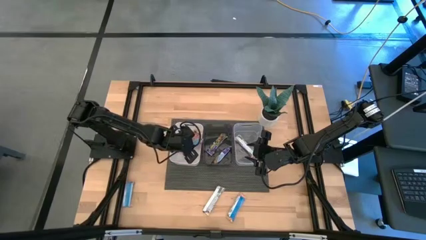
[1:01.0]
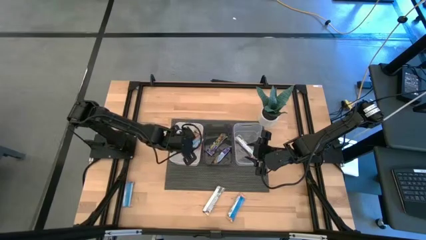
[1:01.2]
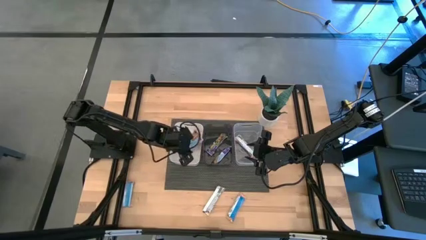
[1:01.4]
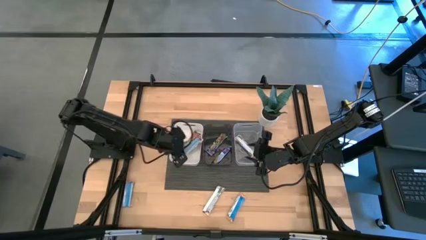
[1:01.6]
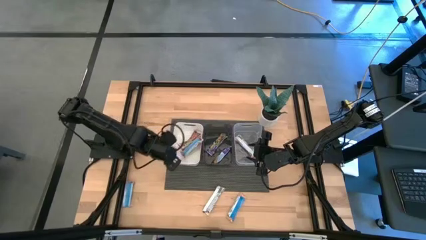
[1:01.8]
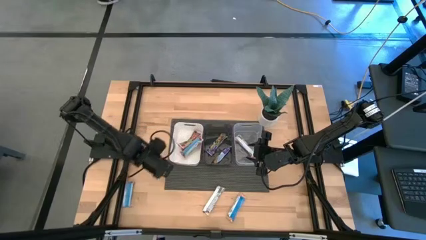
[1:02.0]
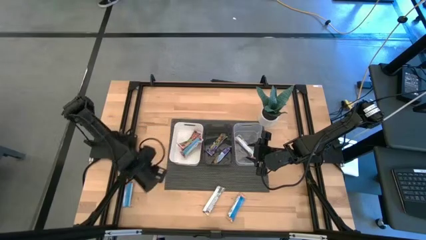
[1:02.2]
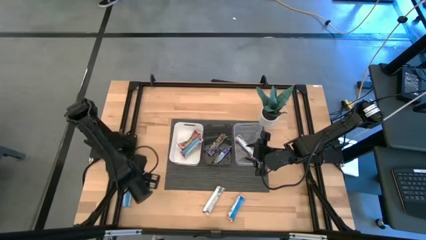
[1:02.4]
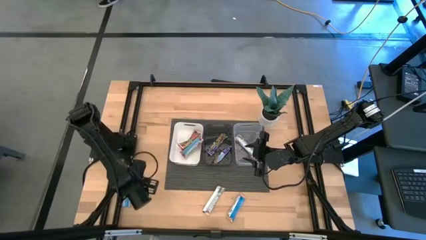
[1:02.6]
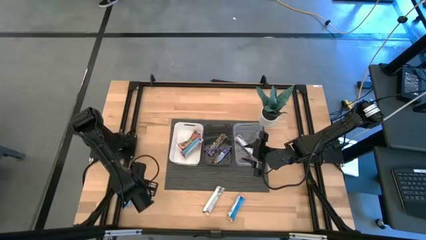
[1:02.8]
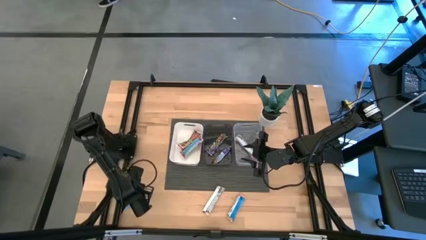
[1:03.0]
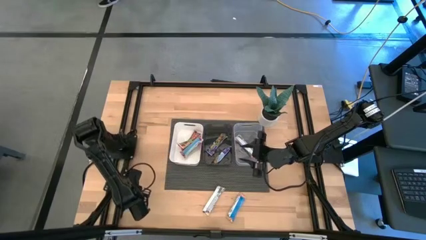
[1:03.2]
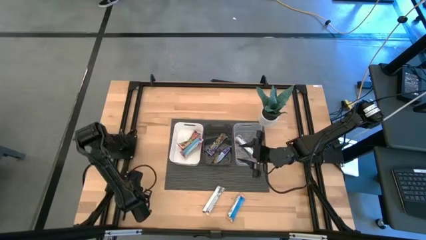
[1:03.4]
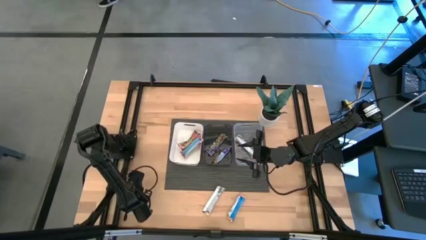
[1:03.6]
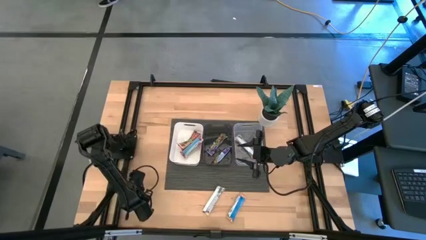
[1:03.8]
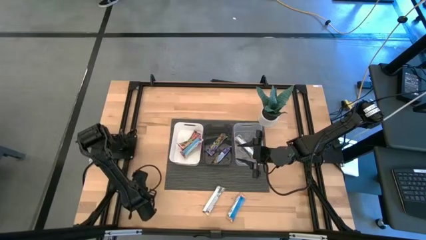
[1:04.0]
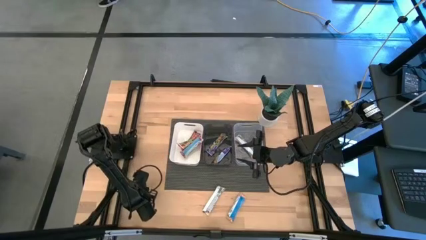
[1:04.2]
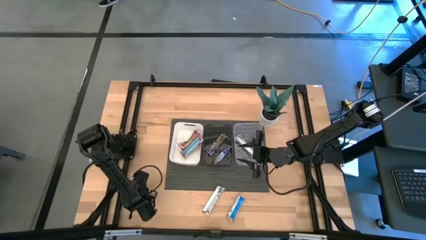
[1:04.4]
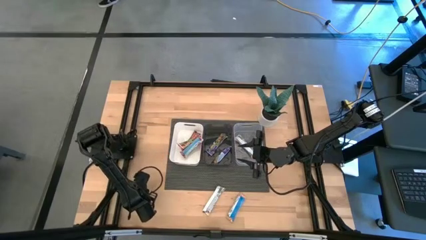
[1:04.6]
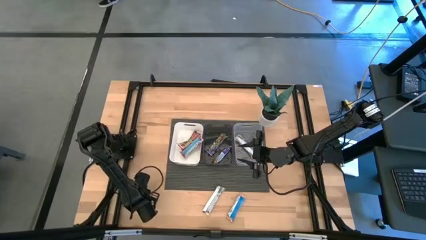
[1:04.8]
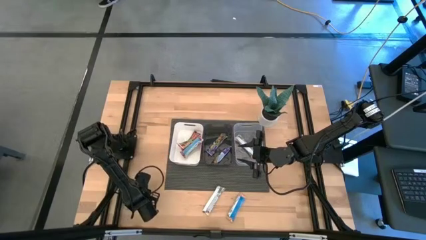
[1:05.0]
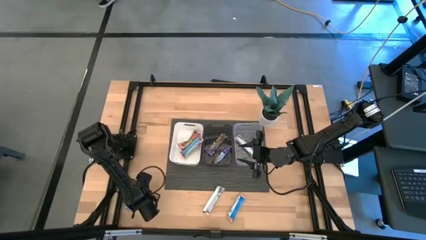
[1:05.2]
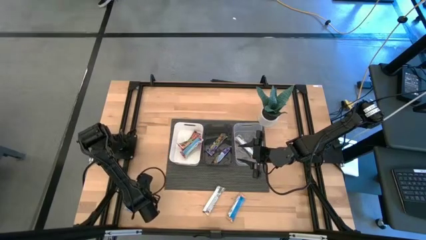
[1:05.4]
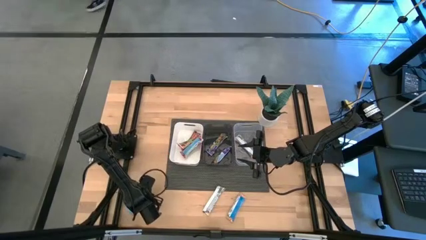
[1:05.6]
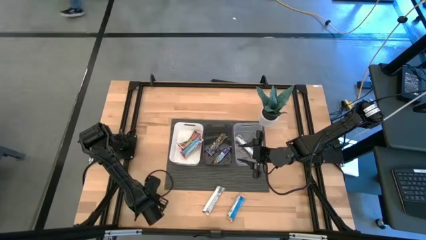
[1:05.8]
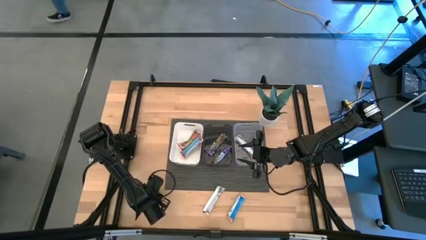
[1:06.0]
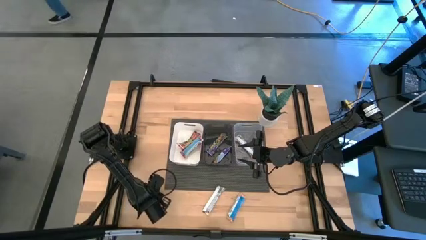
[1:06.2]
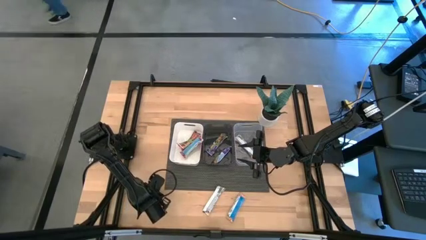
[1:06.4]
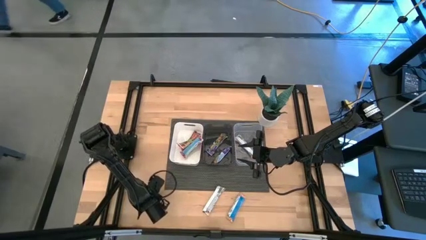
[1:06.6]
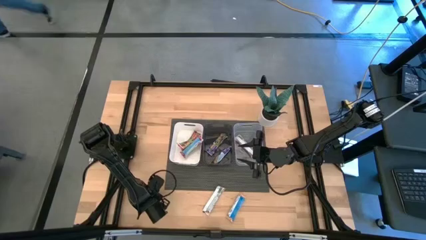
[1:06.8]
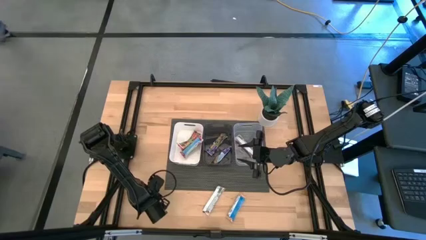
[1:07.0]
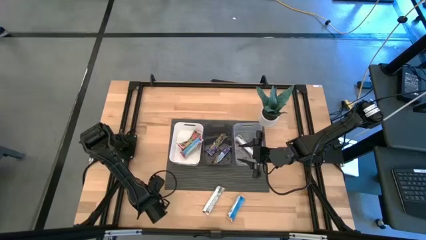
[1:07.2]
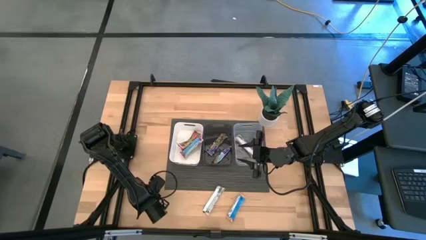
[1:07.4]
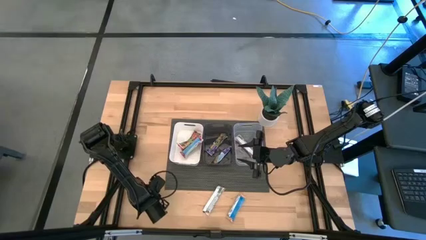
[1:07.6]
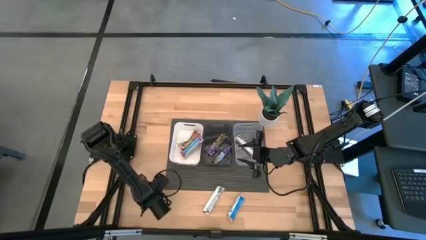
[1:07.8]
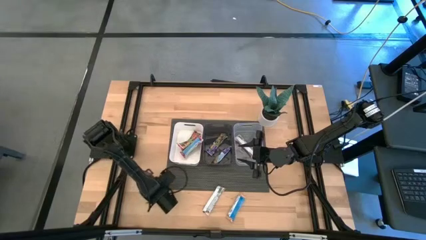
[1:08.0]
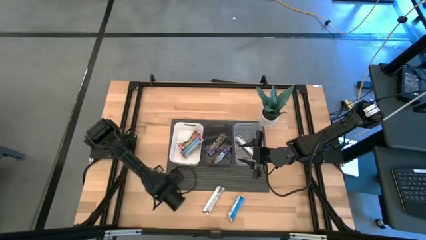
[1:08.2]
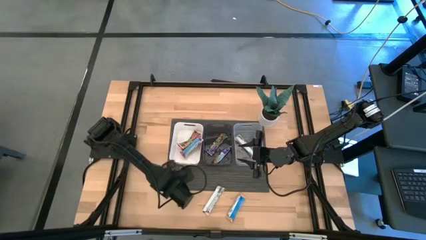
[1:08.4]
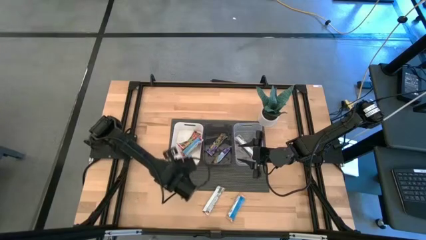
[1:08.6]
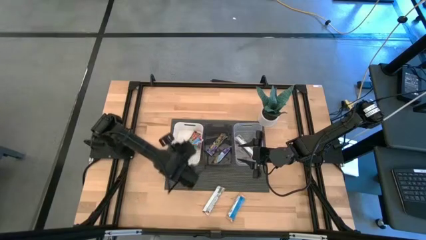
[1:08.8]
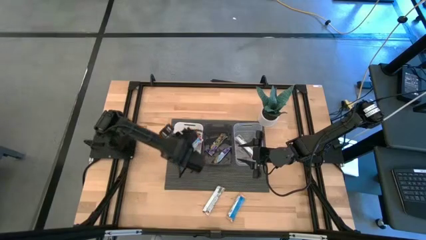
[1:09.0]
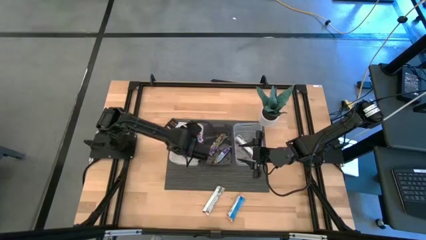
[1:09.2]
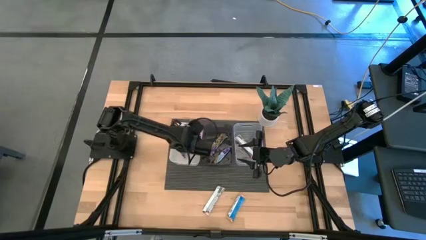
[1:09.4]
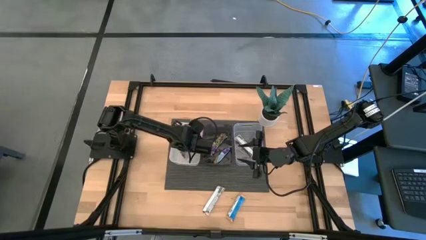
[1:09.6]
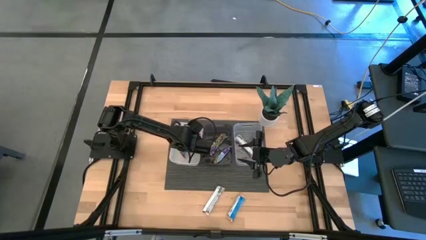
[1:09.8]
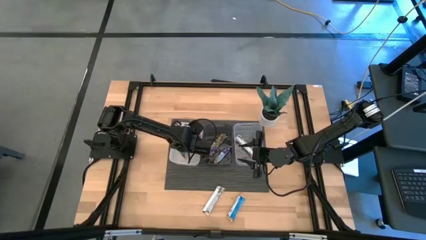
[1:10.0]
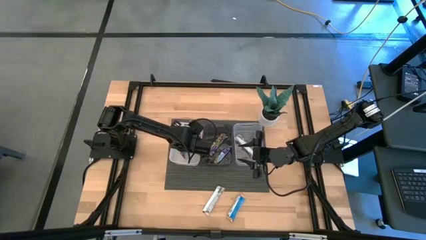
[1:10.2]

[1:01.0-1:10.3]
Task: Pick and place Granola Bars by type
Put the red granola bar into the white bin

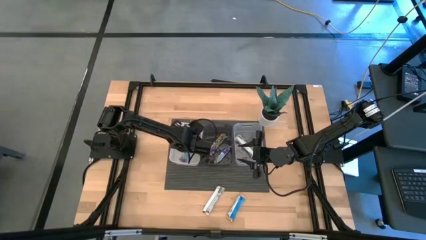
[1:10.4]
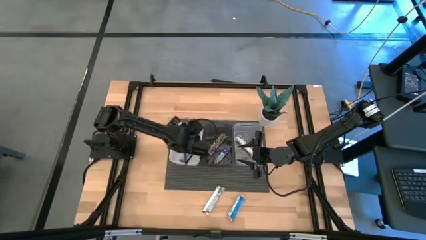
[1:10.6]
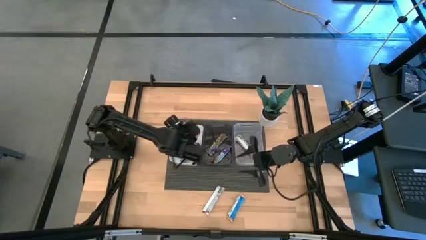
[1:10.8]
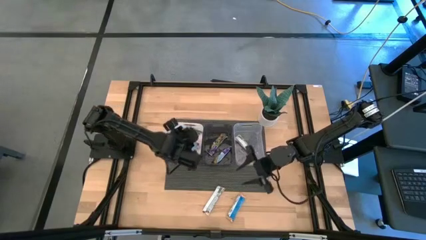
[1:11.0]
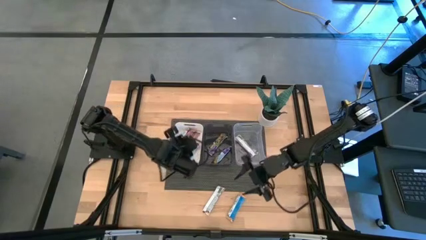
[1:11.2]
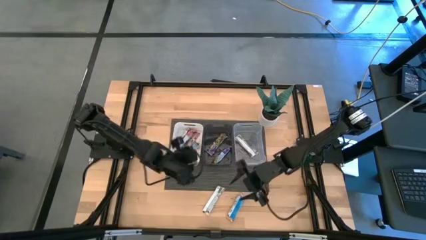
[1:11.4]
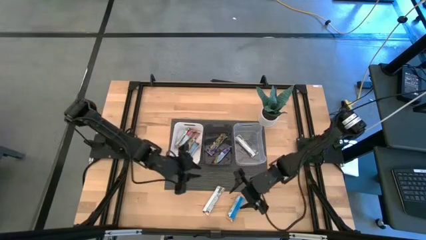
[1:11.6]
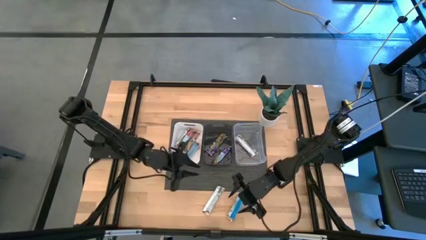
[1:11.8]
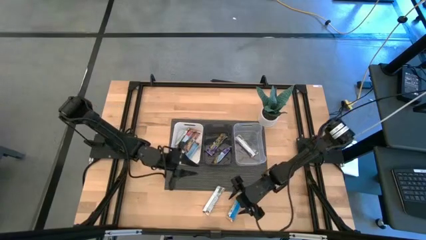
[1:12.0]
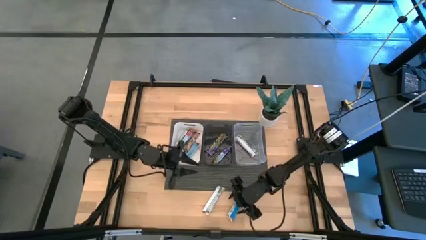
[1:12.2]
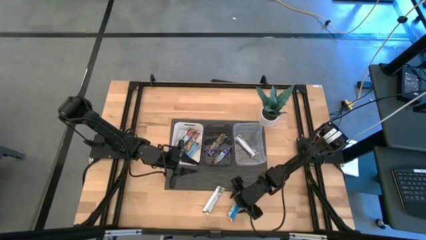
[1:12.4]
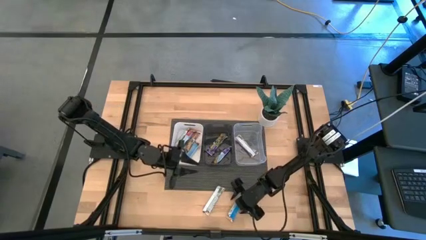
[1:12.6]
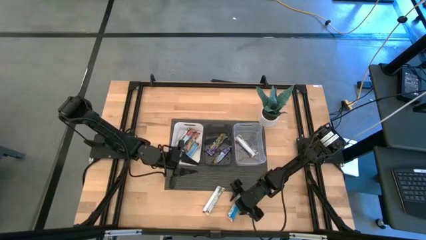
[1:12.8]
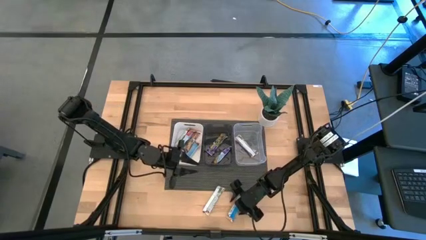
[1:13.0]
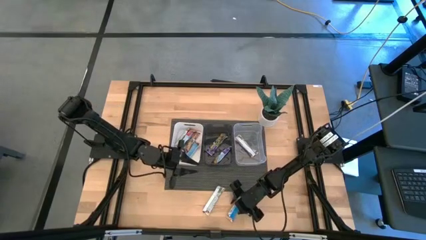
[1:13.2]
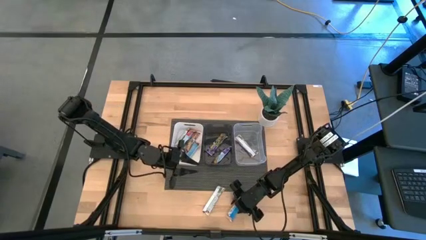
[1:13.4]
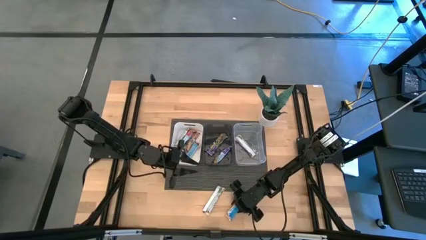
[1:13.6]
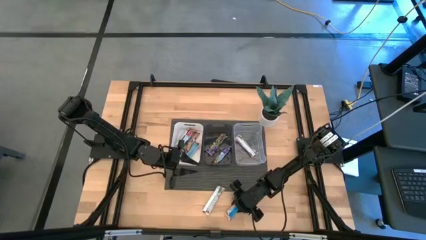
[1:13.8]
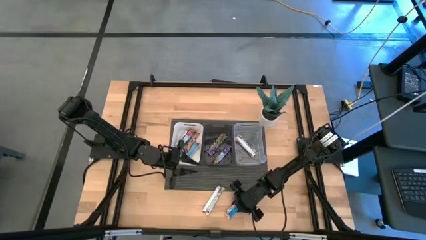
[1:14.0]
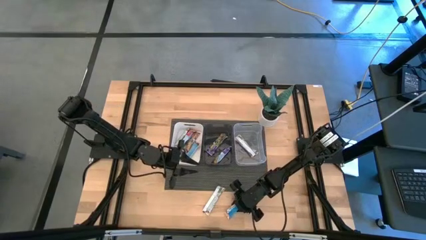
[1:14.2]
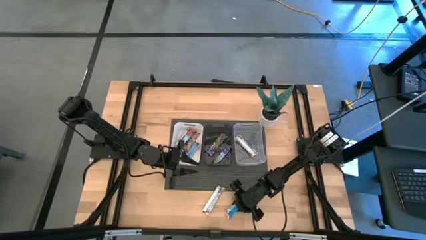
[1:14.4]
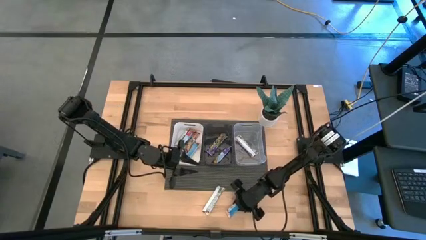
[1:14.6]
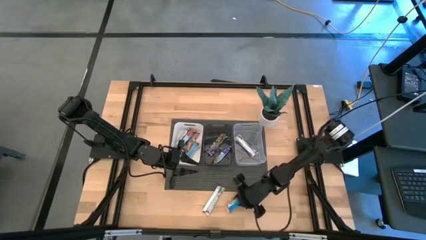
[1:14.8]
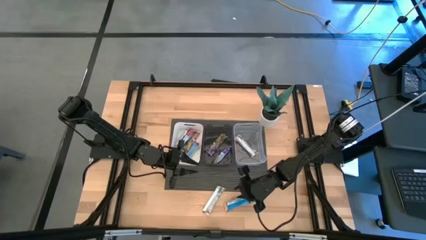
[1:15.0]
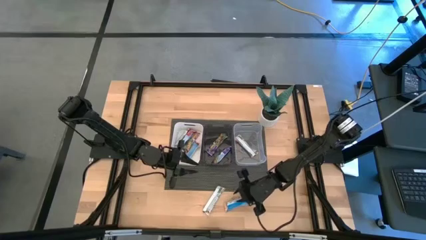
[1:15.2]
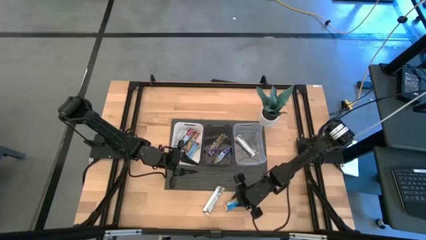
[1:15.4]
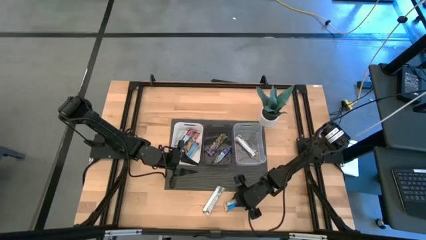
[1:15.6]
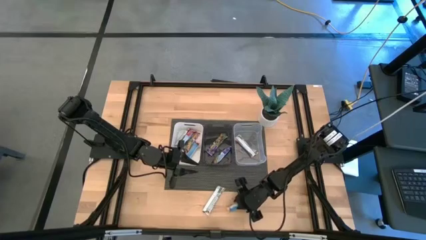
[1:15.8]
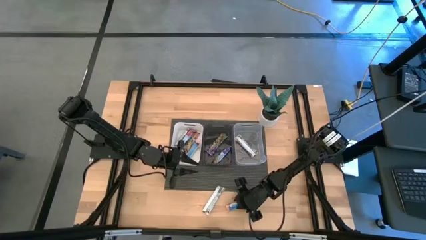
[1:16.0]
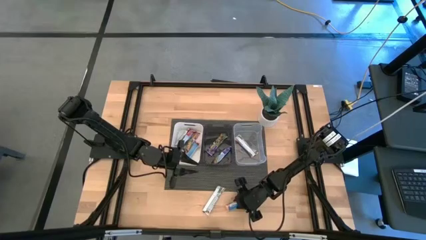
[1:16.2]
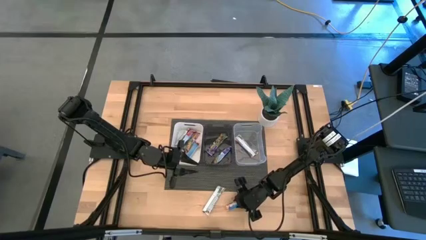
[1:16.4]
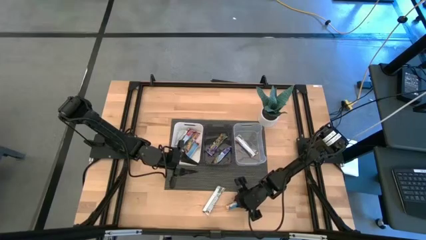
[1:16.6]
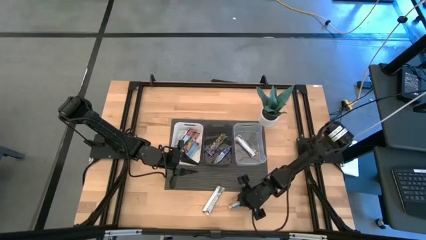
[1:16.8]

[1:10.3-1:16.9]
Put the yellow granola bar into the transparent bin

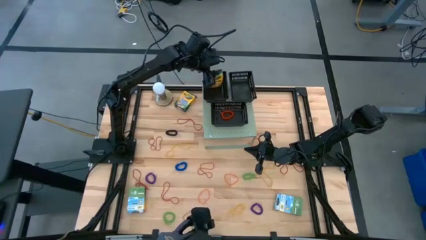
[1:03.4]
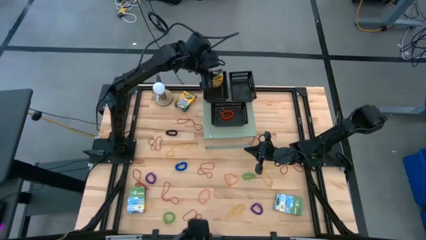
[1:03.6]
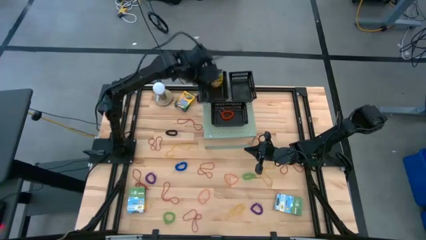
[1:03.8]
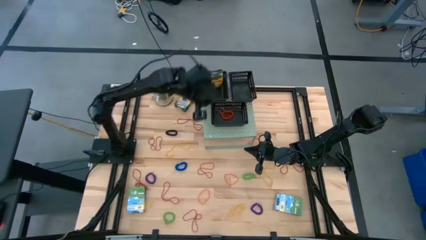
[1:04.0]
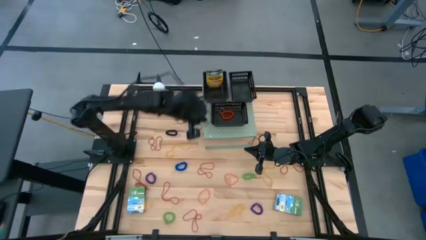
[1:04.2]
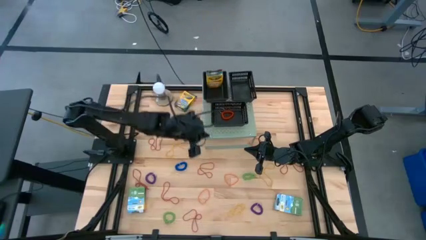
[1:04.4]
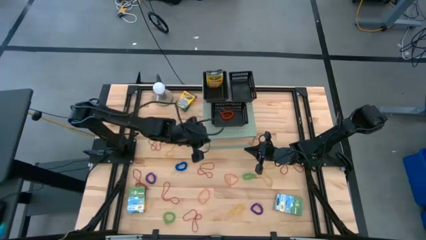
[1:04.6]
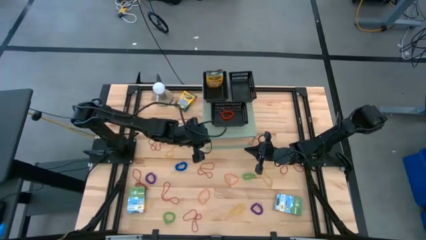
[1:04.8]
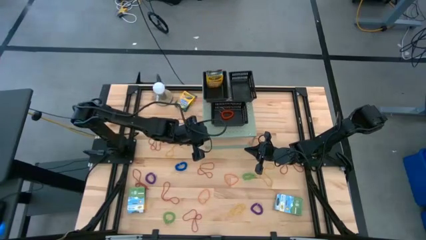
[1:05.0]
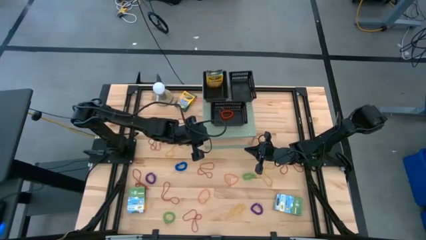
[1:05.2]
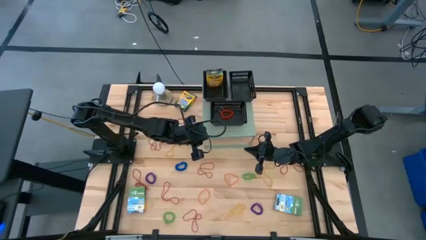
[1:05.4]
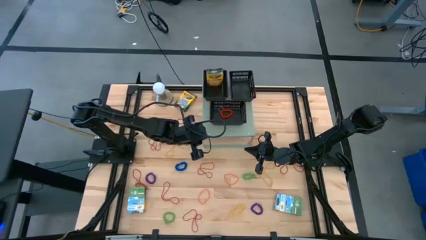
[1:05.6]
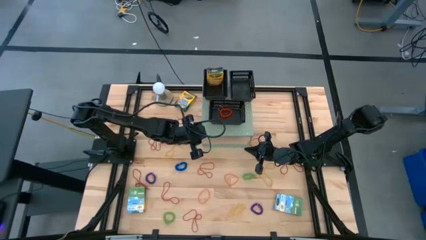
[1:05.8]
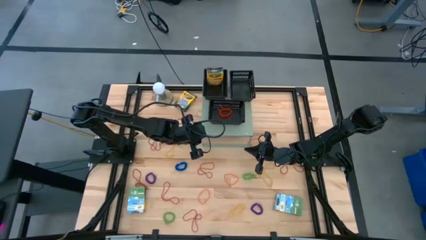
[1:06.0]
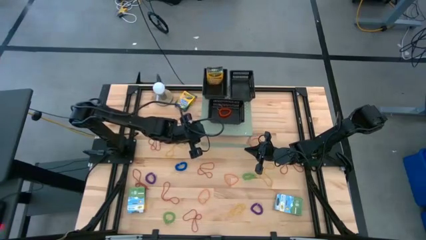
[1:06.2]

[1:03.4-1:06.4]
Task: Pick & Place Office Desk Supplies
Adjust the shelf
